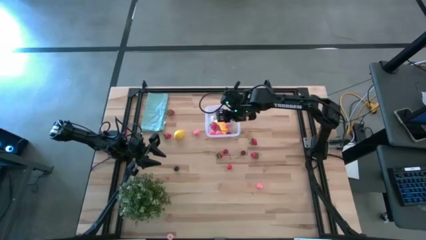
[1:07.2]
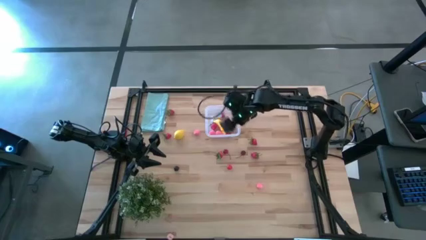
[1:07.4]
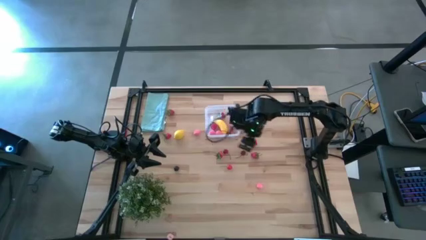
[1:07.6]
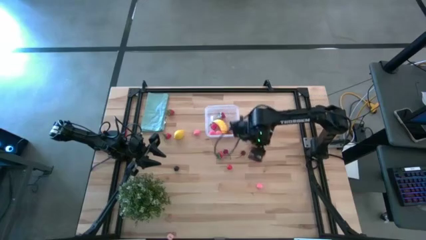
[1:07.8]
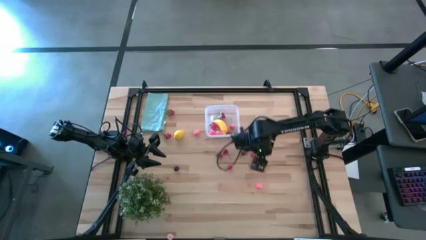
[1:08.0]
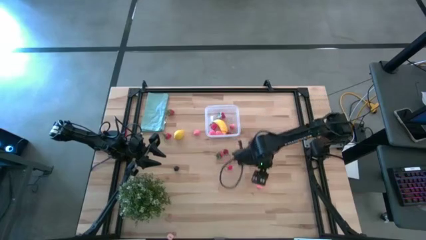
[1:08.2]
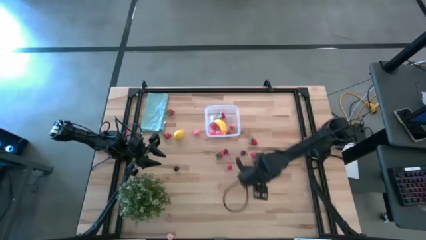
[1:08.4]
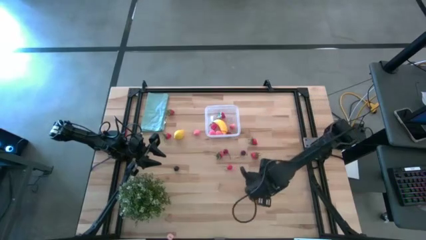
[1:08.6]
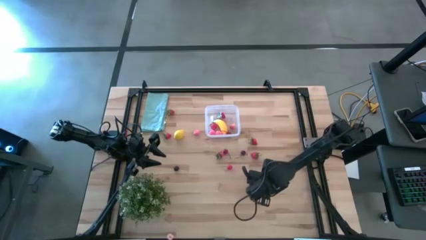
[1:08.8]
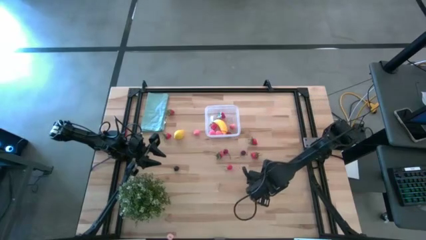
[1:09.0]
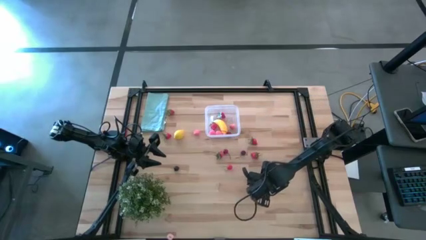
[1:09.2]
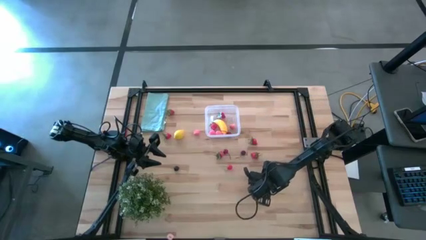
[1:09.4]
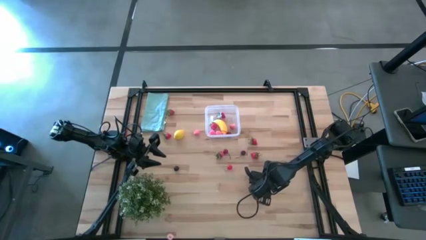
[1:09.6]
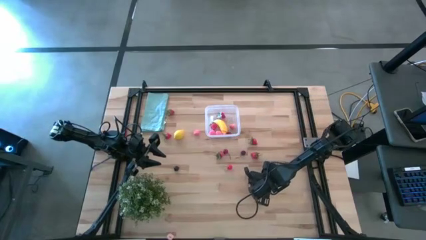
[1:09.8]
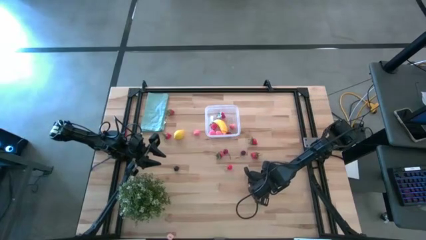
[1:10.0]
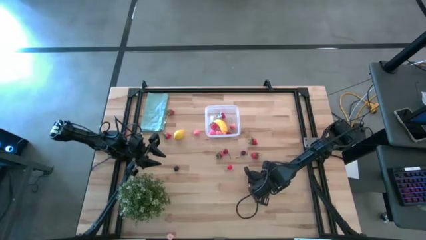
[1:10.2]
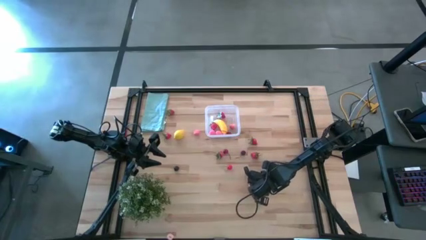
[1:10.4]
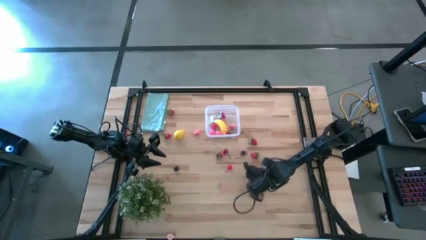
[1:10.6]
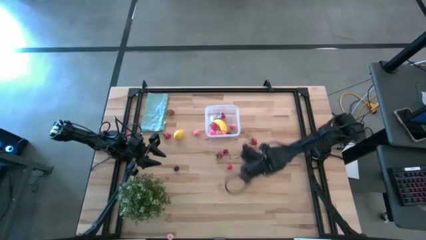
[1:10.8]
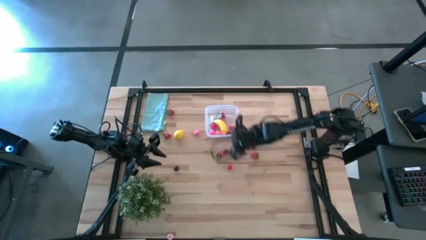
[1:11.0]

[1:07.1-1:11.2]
Task: Pick and placing Produce into tupperware
Put the pink peach into the transparent bin

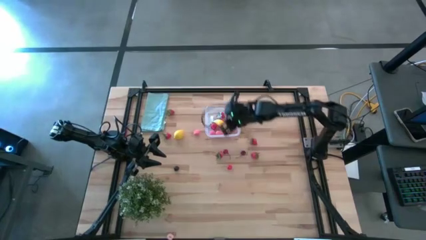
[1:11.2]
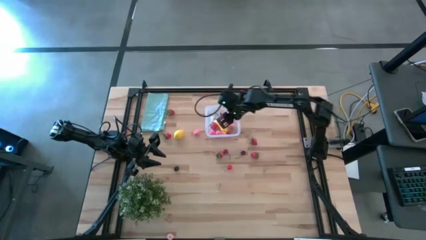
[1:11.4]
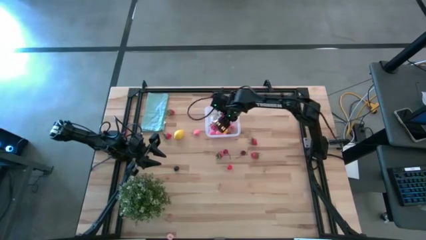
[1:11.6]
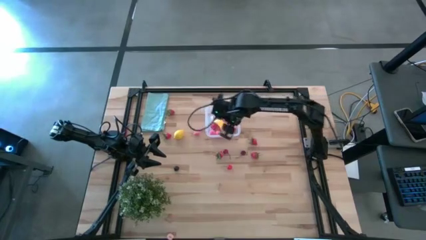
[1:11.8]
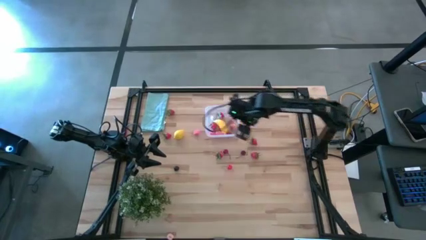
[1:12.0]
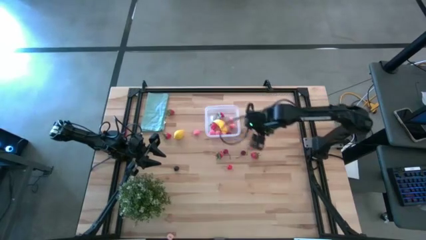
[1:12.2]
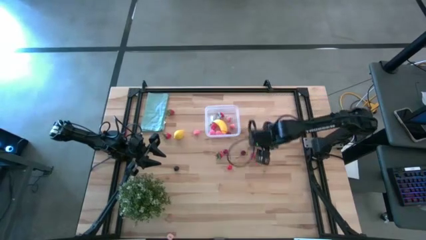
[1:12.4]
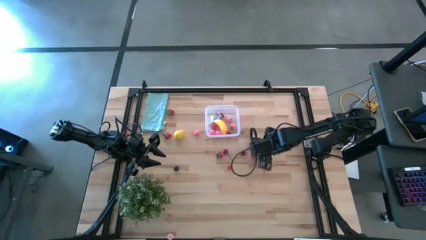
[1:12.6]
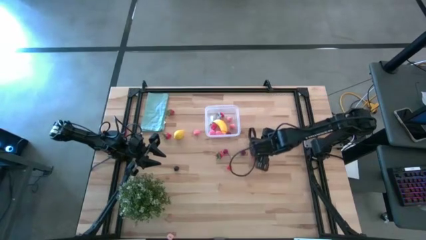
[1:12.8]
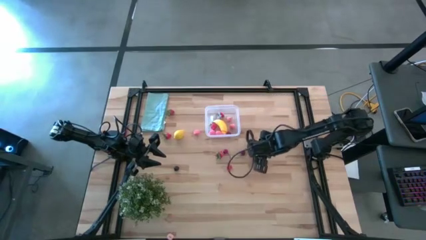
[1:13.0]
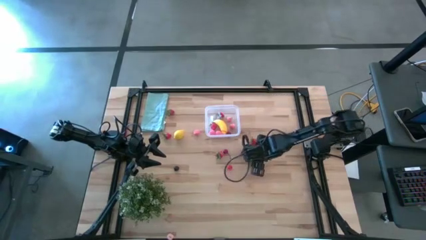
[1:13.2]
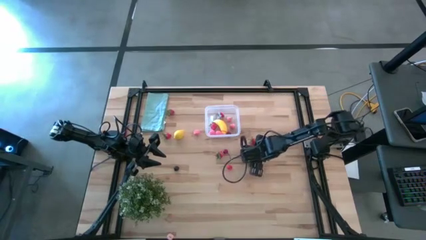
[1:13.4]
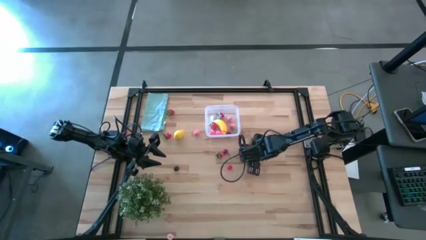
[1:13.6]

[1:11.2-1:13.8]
Put the red strawberry into the transparent bin

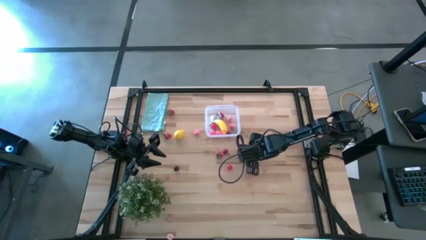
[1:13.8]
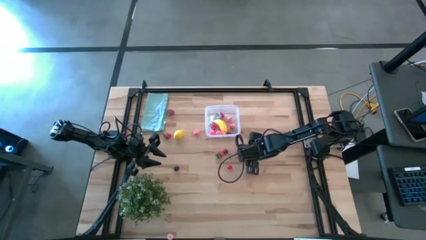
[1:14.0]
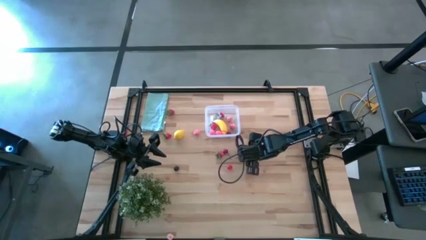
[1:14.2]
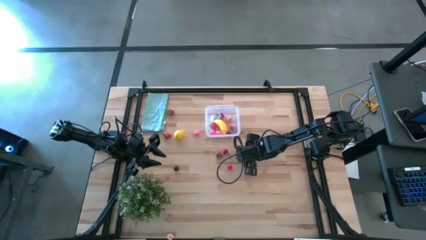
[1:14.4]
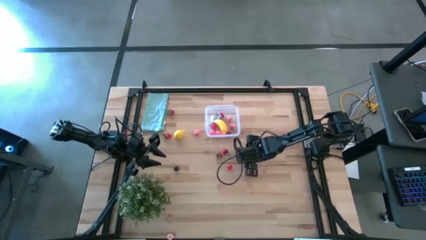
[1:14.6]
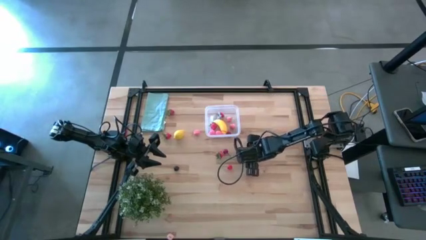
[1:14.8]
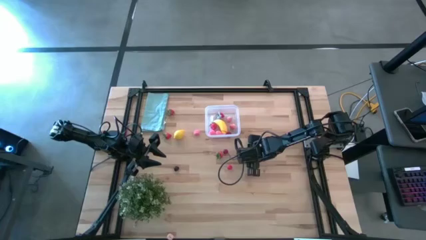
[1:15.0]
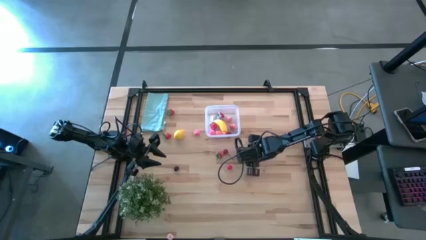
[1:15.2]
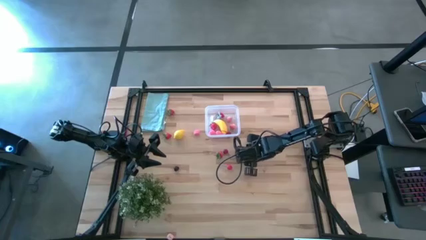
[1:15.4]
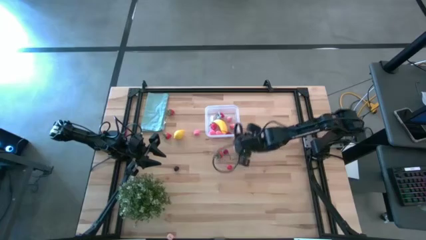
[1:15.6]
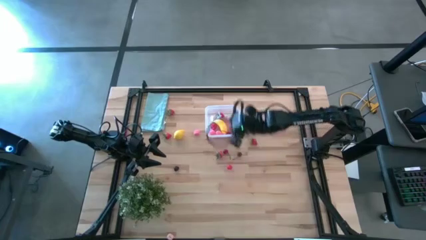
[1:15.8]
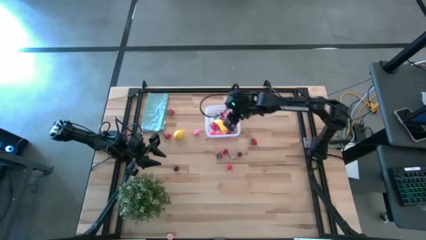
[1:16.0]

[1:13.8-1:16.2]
Put the red strawberry into the transparent bin

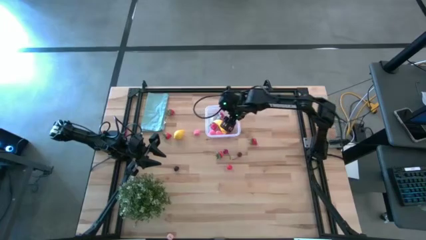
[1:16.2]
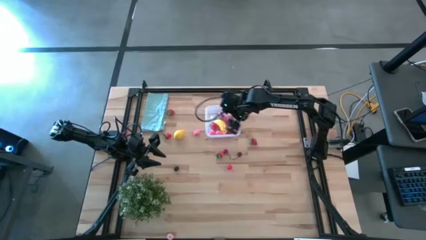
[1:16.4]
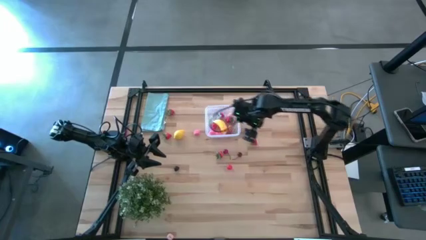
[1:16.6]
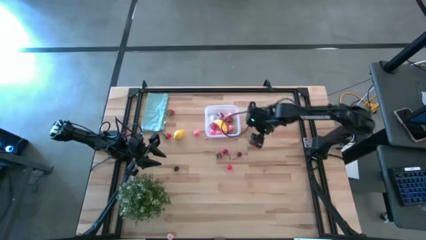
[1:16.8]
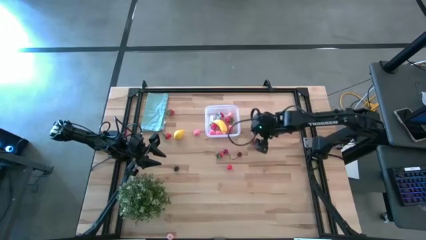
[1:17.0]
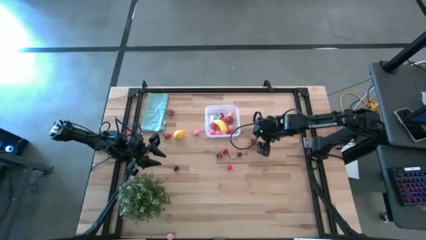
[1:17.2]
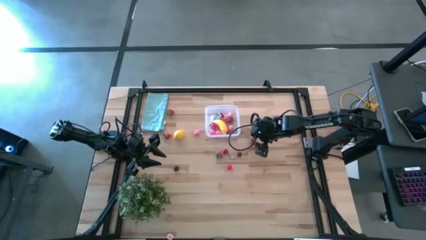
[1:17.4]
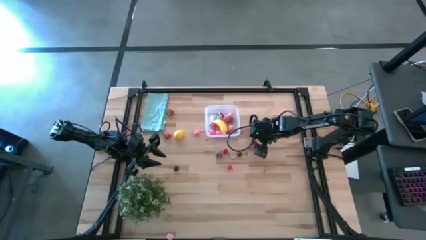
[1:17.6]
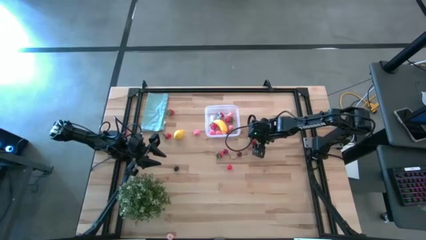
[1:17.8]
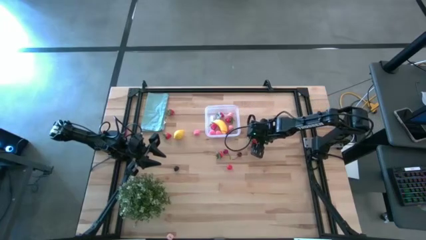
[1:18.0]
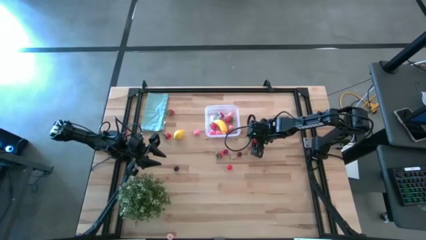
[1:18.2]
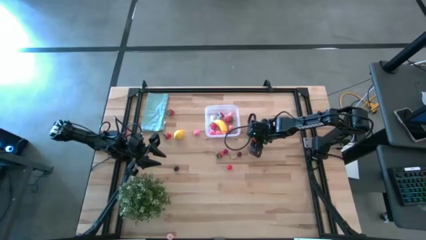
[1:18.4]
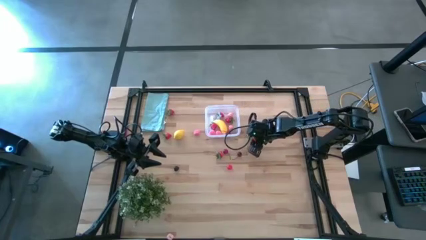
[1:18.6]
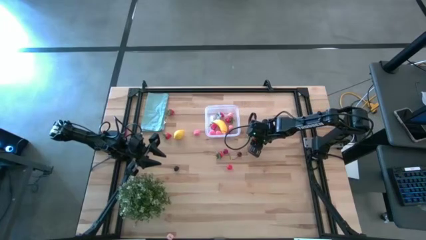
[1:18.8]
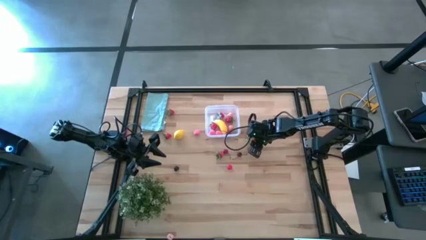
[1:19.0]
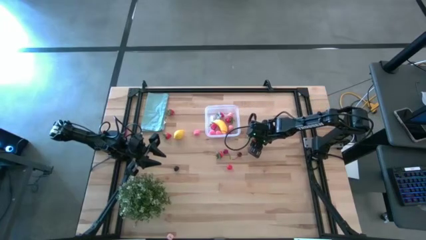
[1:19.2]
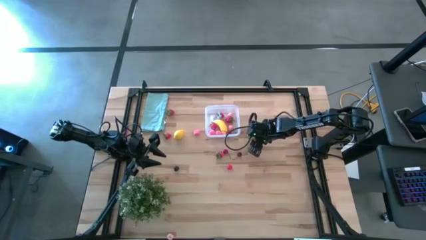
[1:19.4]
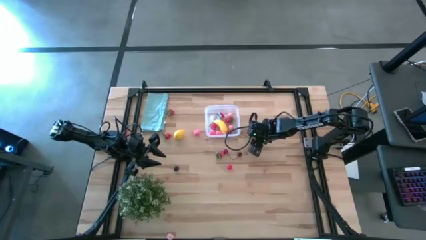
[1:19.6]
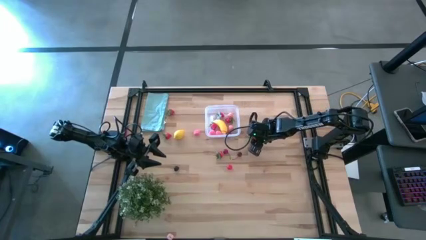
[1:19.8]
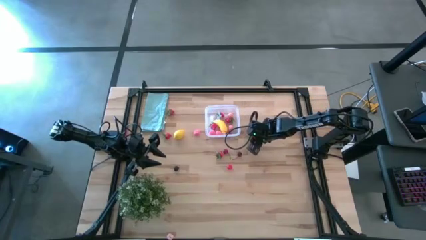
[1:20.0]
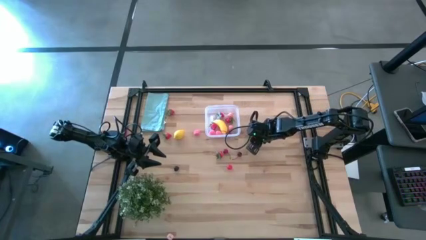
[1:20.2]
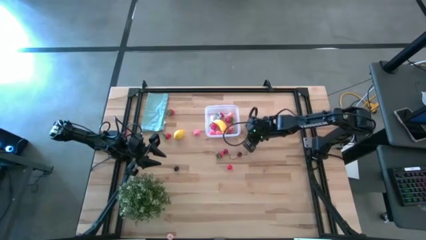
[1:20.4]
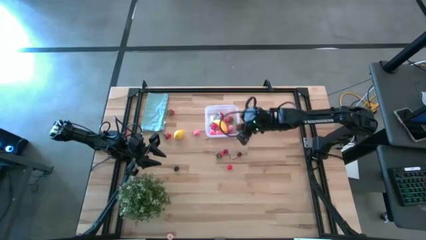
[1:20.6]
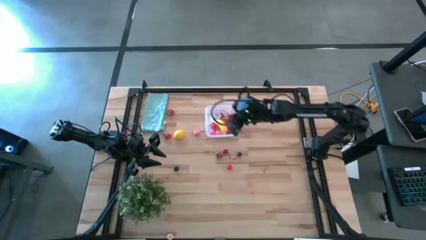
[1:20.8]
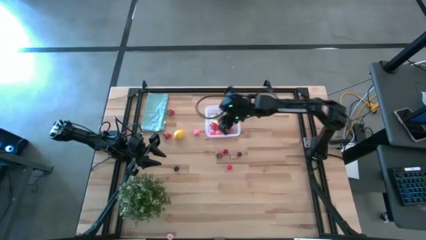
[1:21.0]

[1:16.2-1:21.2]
Put the red strawberry into the transparent bin

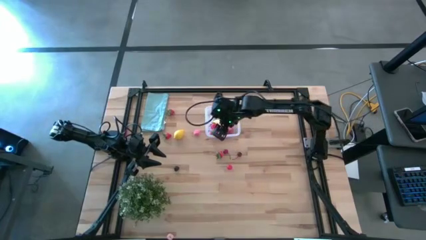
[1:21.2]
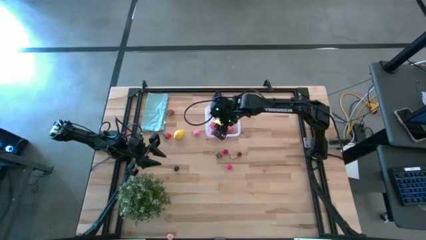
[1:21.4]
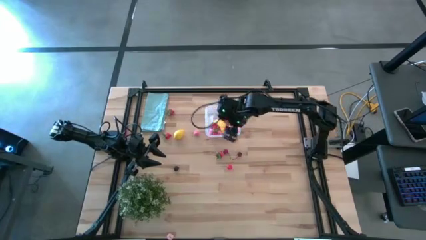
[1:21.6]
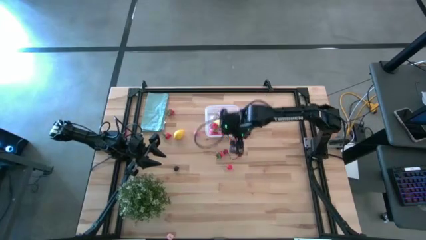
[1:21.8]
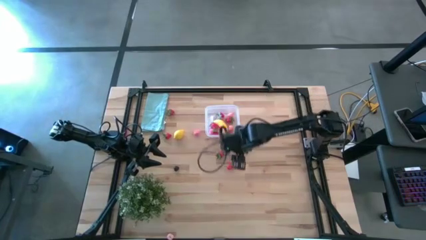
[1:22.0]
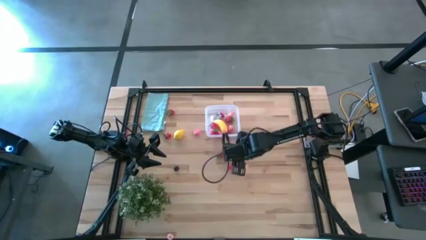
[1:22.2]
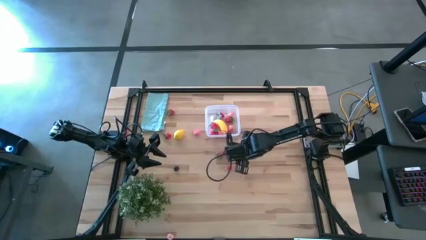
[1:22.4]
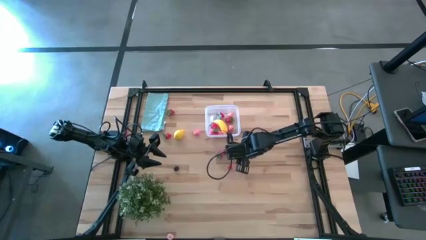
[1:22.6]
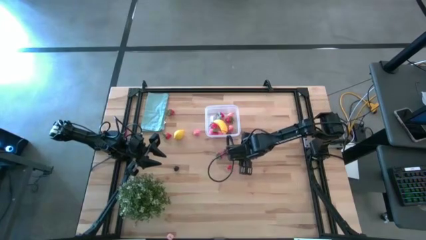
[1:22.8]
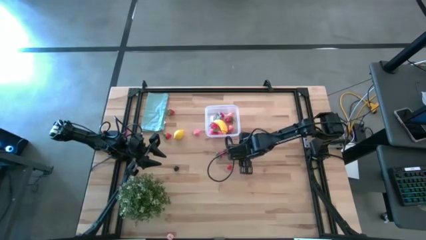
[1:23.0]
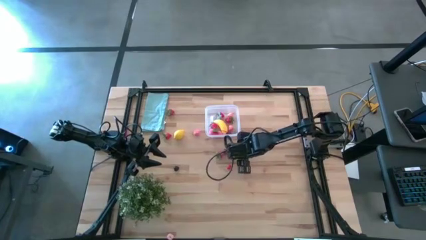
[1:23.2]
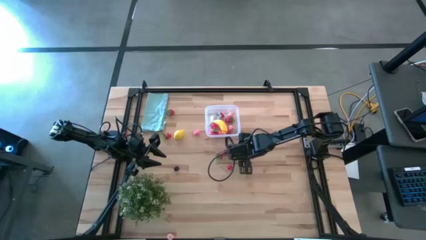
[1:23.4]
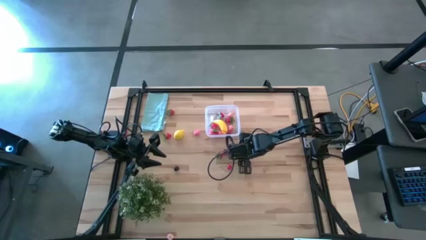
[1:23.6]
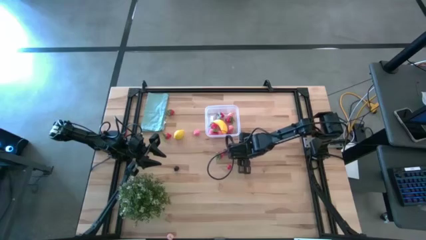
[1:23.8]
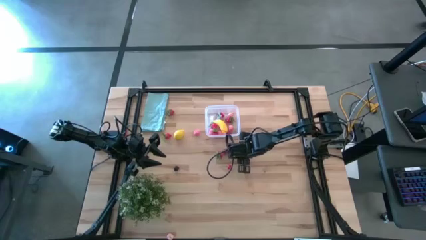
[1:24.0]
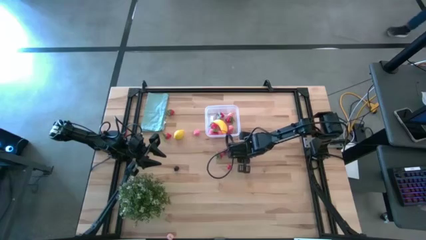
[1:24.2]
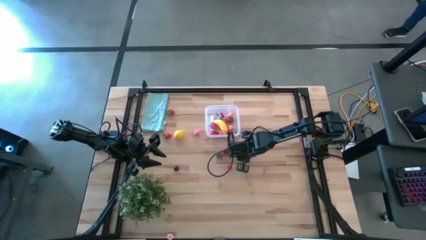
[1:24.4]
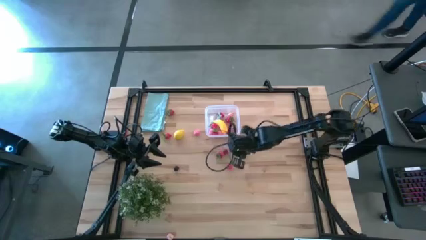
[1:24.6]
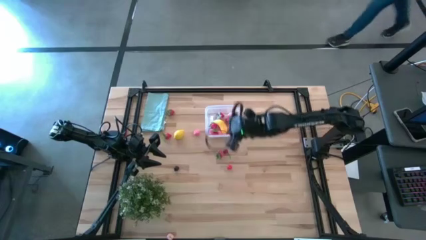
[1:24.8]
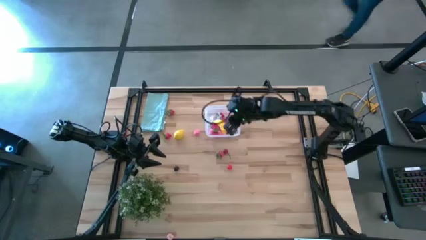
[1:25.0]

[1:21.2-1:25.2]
Put the red cherry into the transparent bin
